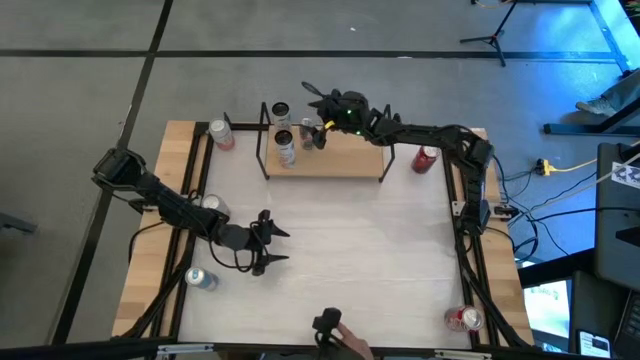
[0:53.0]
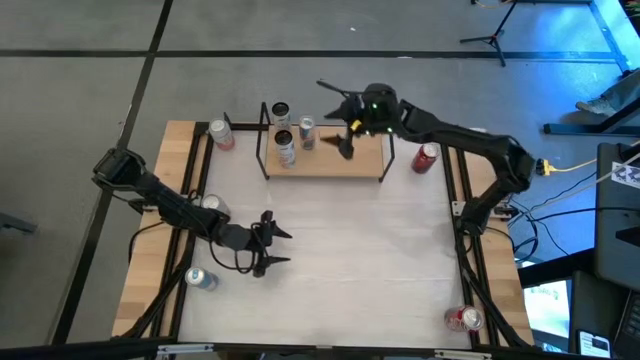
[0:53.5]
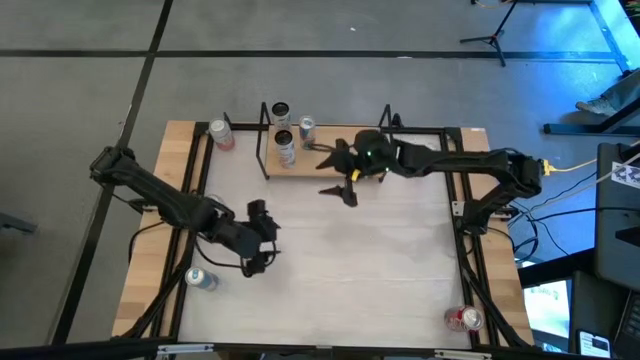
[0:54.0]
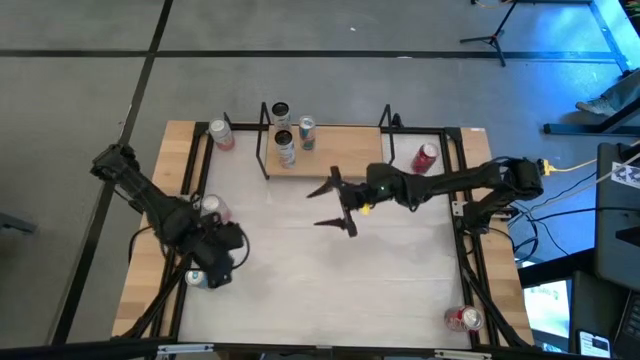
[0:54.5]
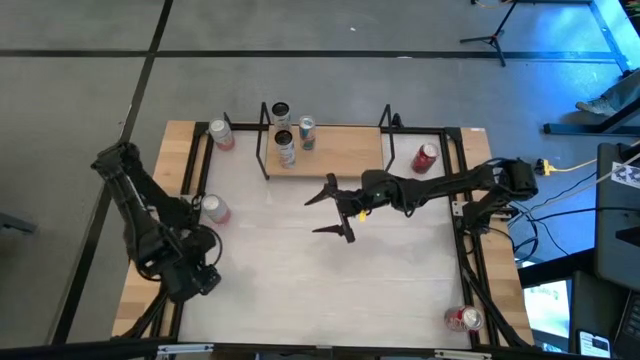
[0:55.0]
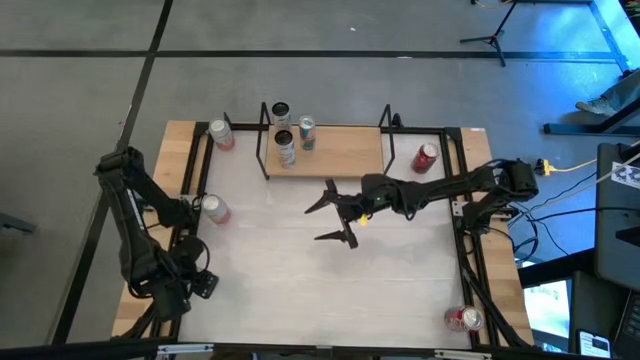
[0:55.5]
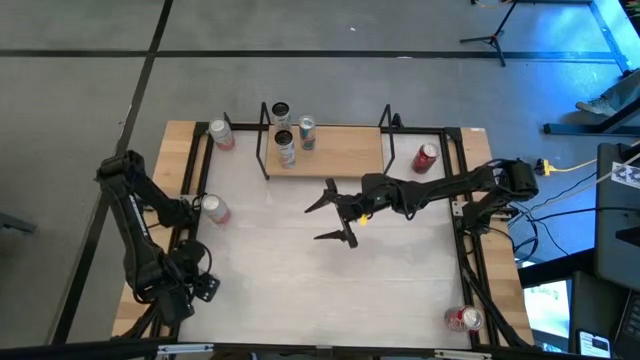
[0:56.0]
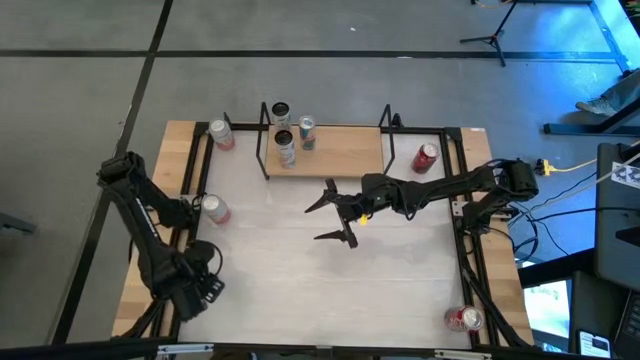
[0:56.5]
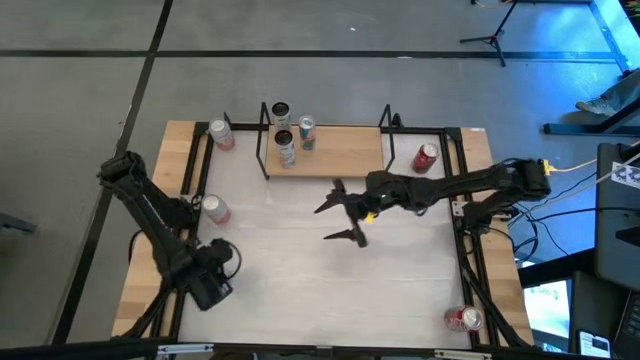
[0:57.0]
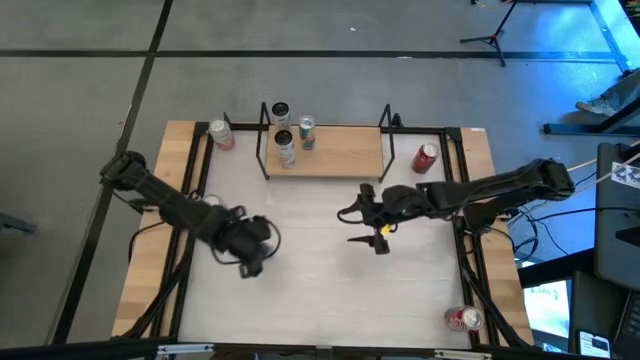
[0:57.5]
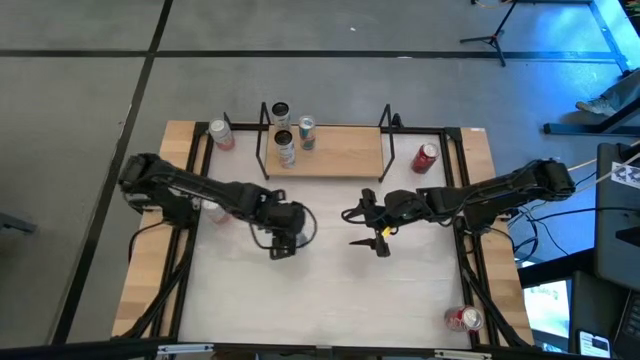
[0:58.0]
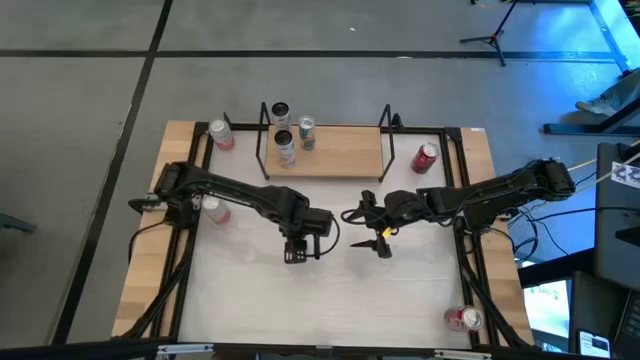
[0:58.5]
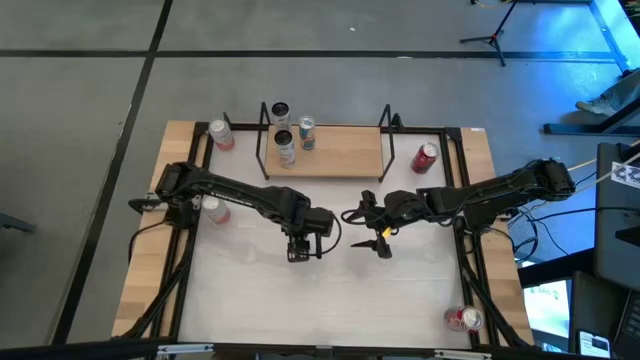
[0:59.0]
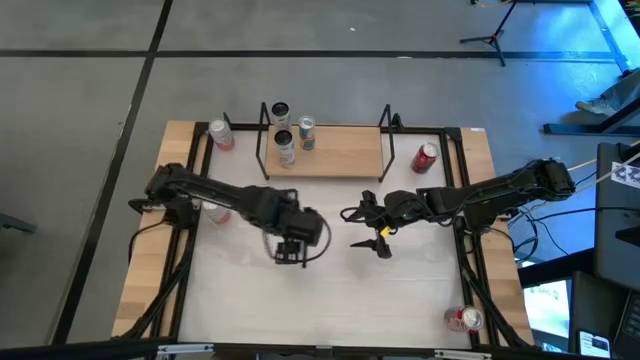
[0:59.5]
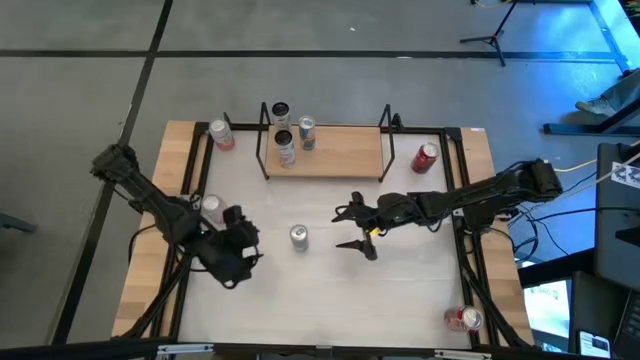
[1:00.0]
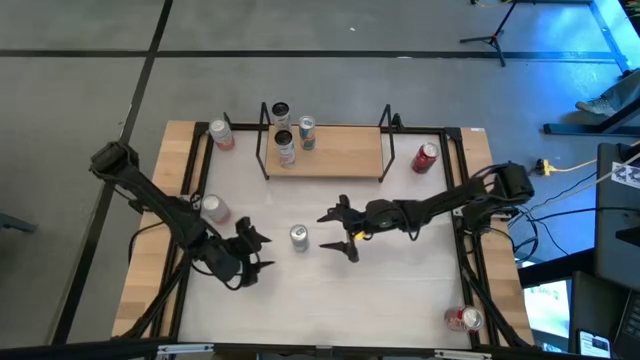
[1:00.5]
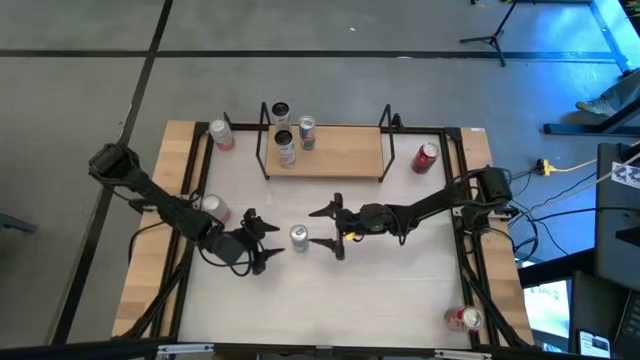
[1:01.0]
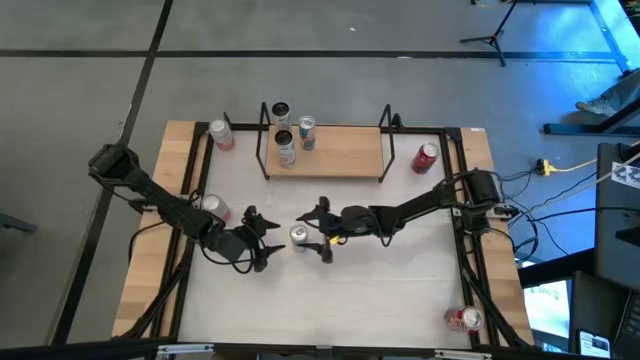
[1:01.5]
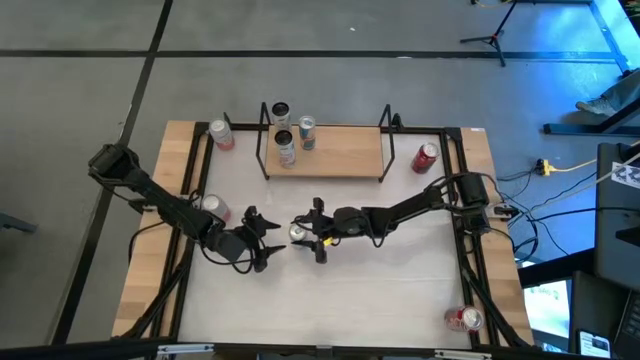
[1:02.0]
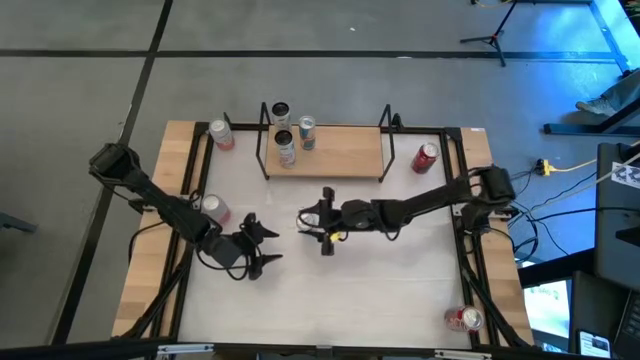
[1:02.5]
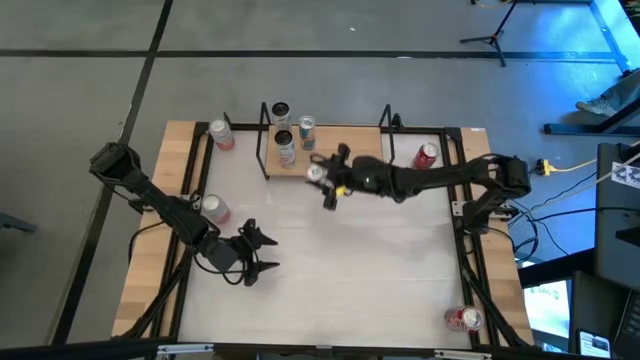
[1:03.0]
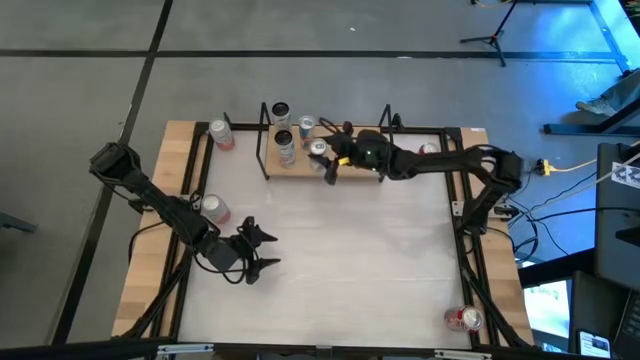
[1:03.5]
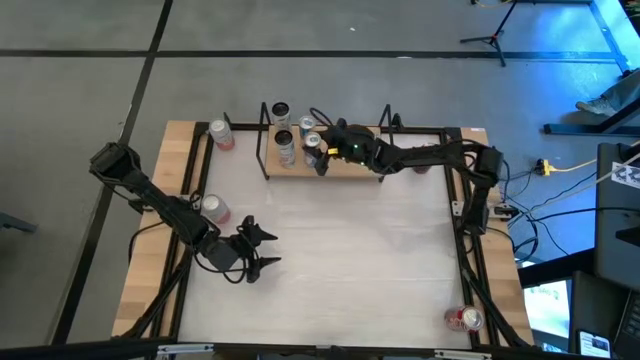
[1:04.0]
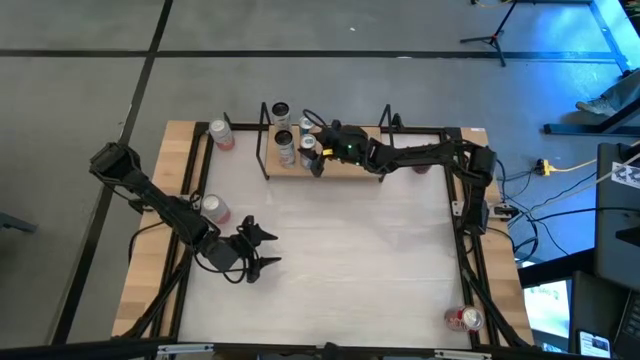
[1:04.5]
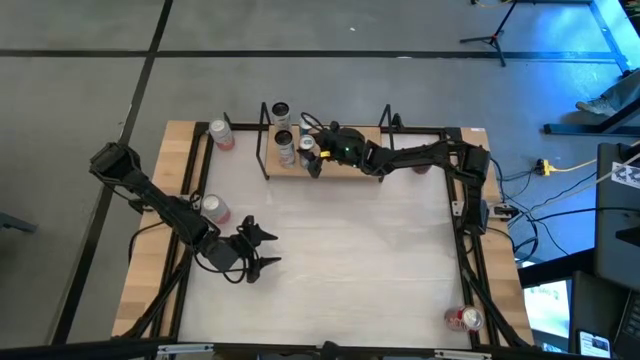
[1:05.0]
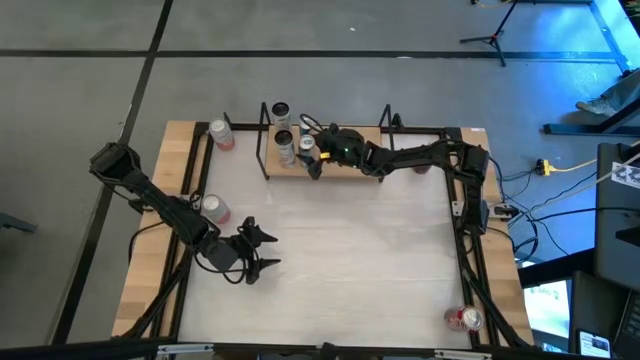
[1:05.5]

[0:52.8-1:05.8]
Task: Place canned beverage on shelf
Put the blue soda can on the shelf aligned with the other blue soda can

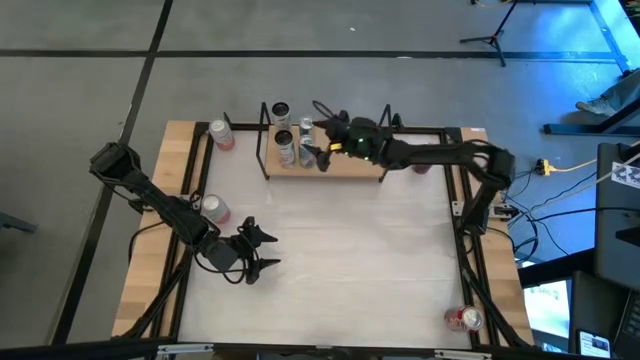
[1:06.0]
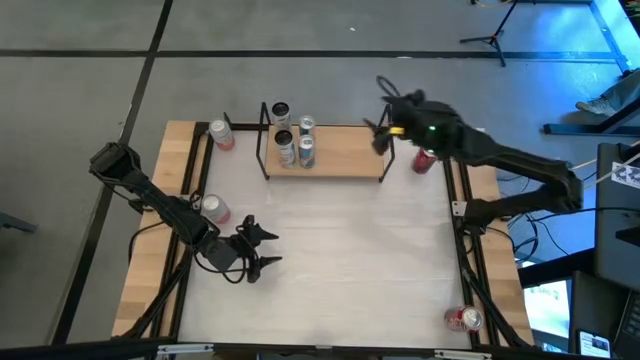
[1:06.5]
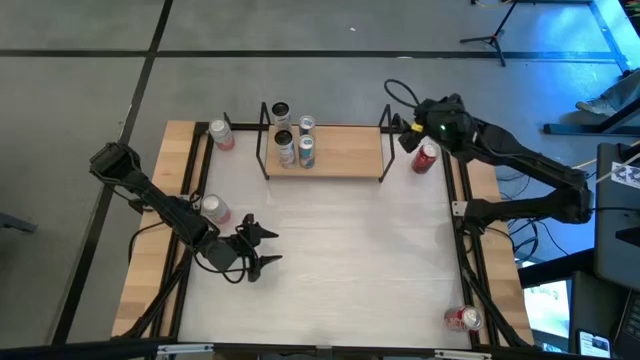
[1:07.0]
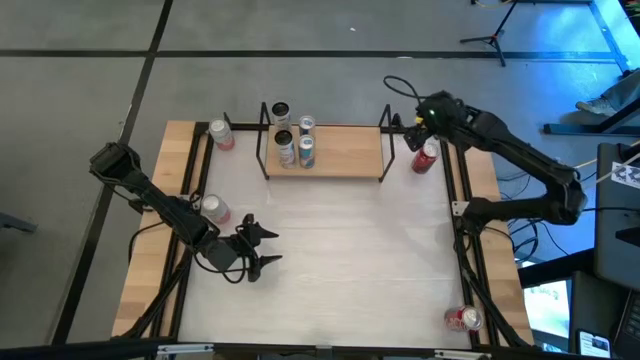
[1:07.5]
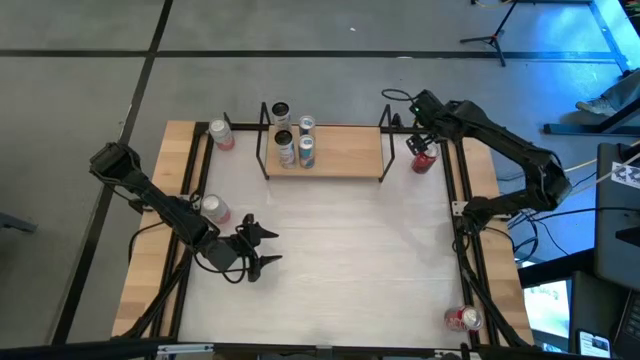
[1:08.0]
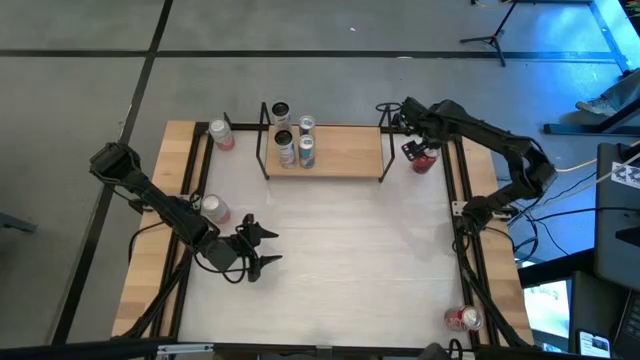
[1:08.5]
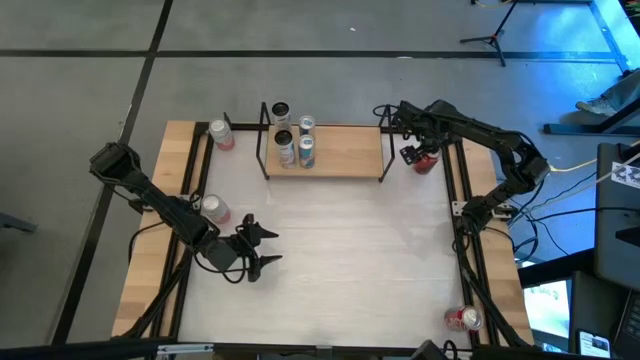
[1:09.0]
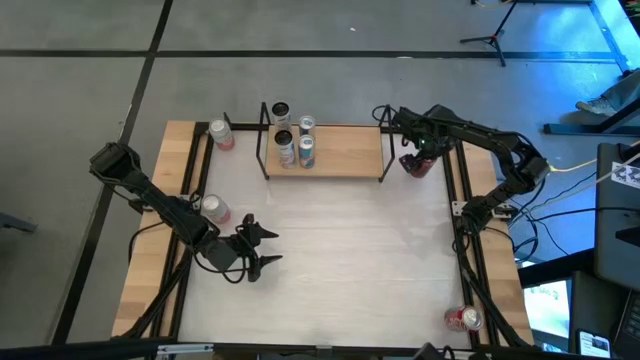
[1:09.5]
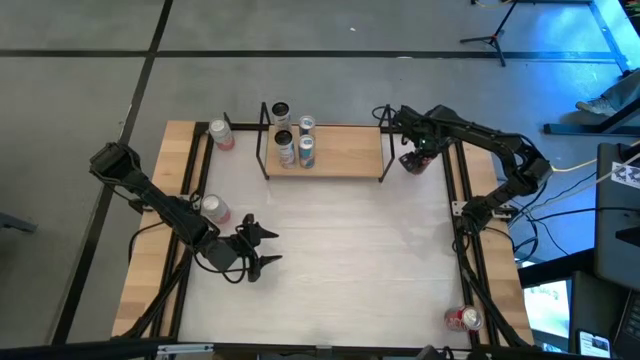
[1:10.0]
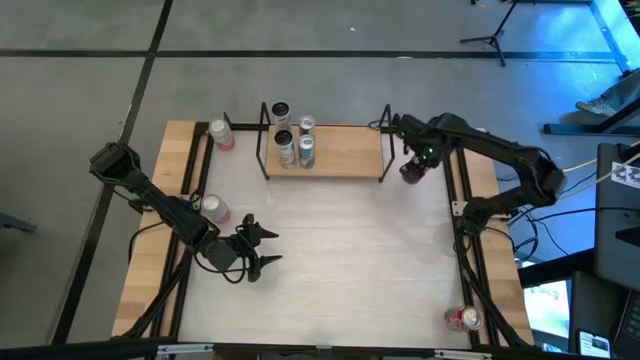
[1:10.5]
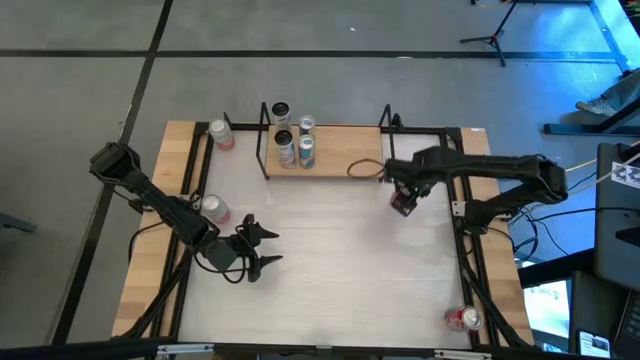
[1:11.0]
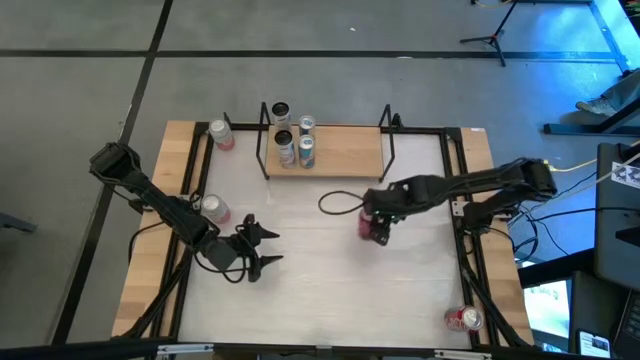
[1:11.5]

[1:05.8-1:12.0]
Put the top red-black soda can on the shelf
